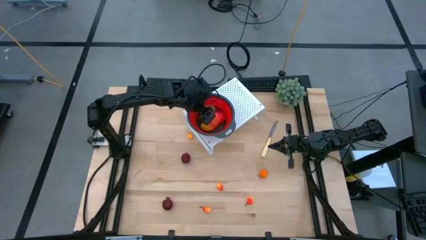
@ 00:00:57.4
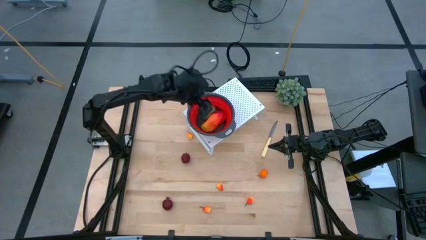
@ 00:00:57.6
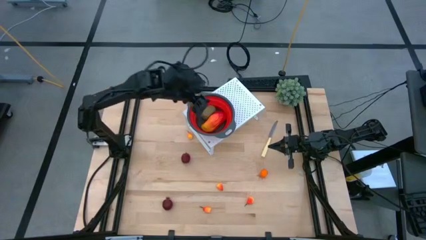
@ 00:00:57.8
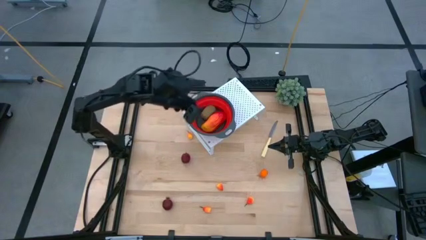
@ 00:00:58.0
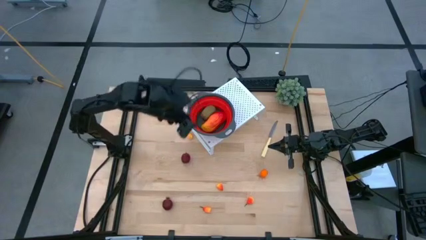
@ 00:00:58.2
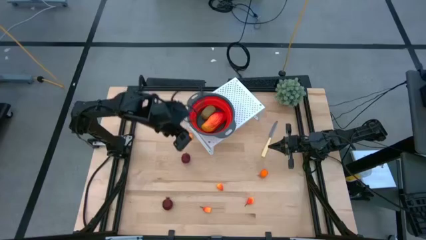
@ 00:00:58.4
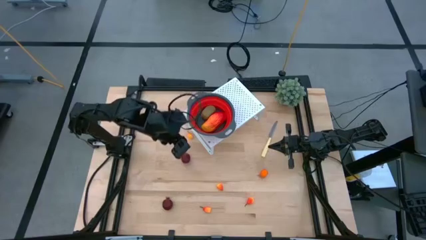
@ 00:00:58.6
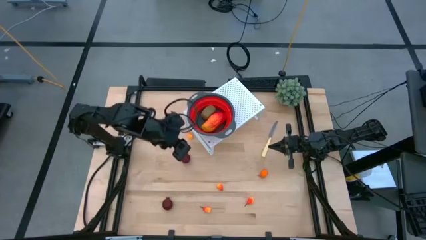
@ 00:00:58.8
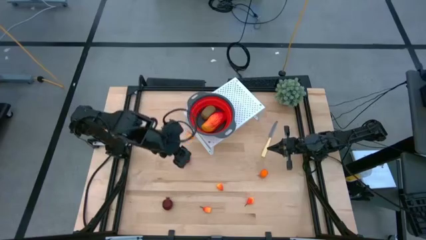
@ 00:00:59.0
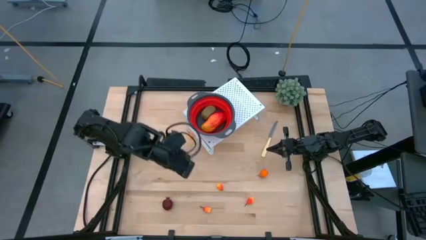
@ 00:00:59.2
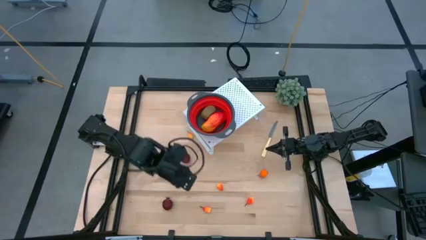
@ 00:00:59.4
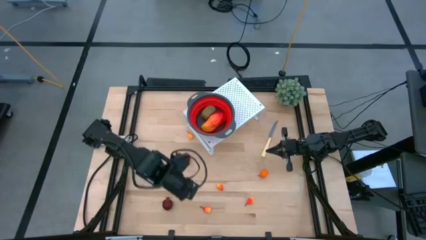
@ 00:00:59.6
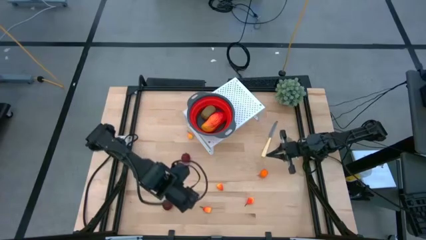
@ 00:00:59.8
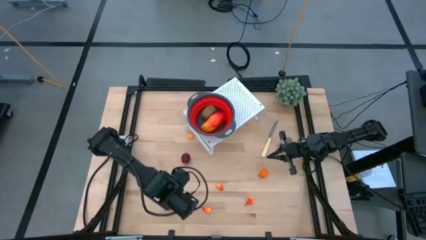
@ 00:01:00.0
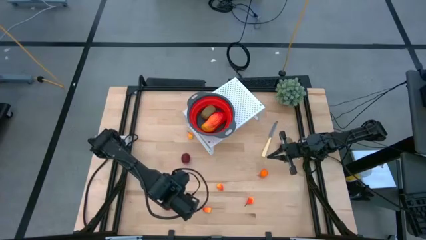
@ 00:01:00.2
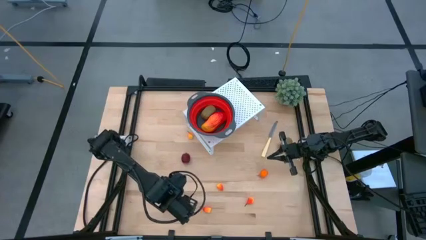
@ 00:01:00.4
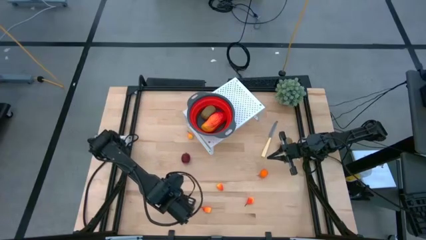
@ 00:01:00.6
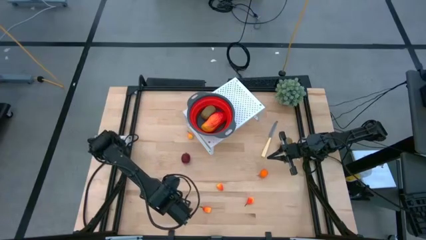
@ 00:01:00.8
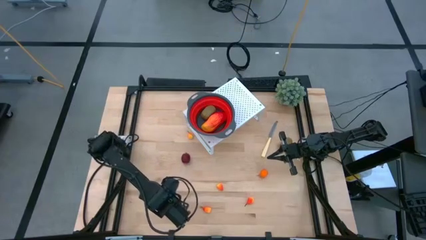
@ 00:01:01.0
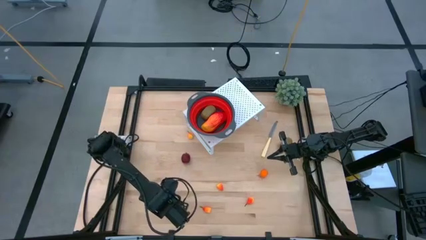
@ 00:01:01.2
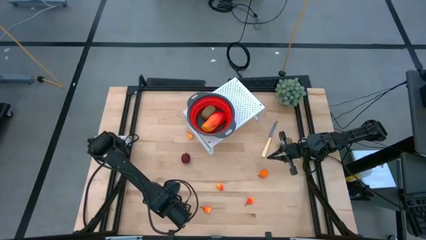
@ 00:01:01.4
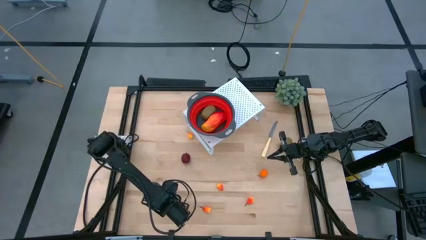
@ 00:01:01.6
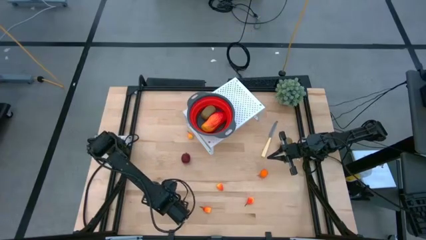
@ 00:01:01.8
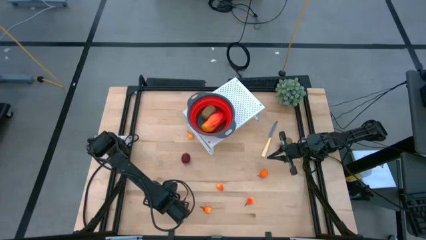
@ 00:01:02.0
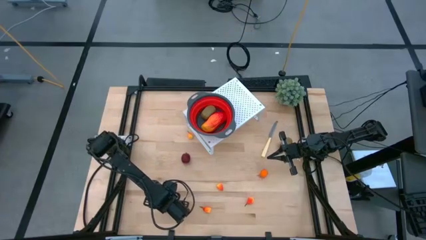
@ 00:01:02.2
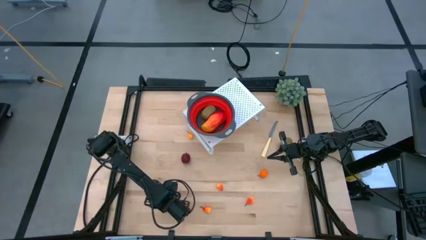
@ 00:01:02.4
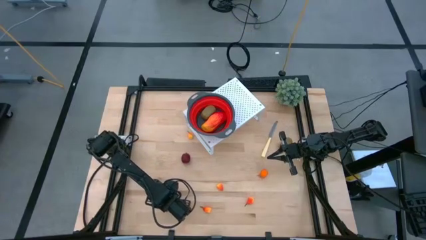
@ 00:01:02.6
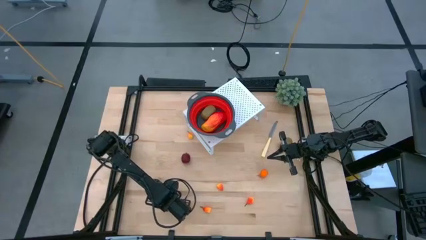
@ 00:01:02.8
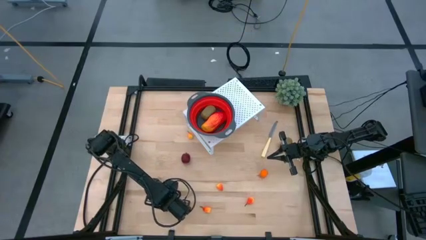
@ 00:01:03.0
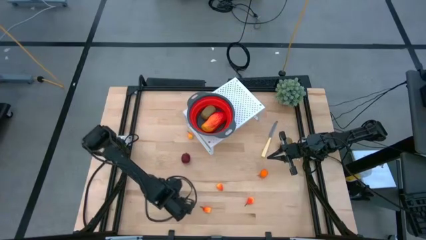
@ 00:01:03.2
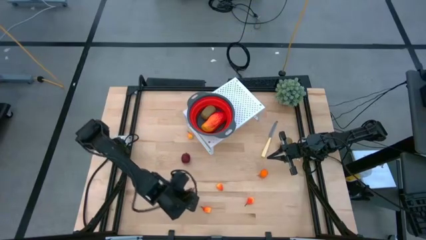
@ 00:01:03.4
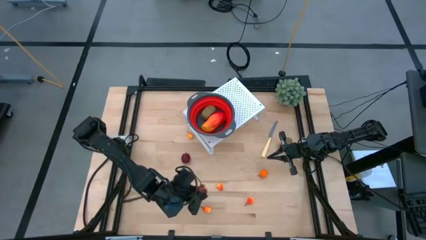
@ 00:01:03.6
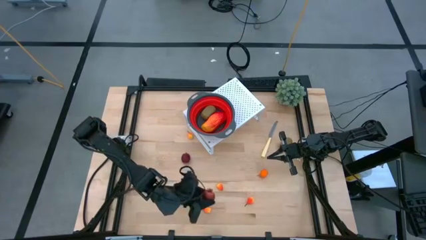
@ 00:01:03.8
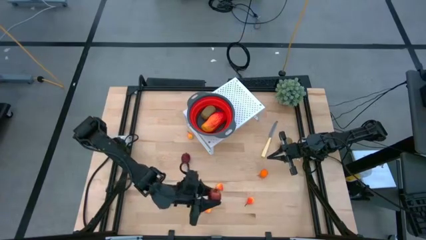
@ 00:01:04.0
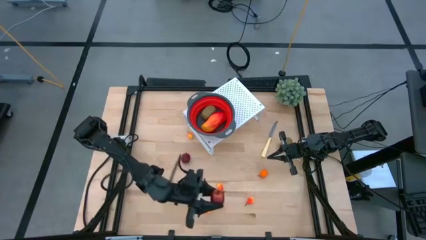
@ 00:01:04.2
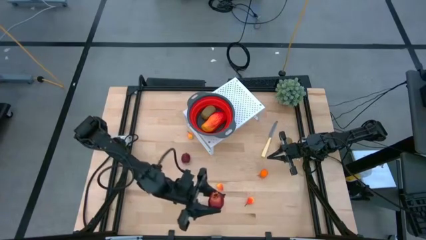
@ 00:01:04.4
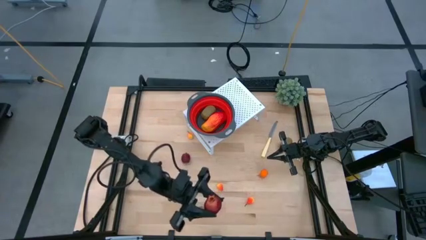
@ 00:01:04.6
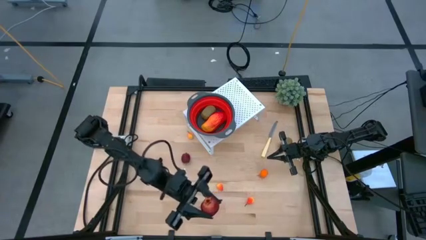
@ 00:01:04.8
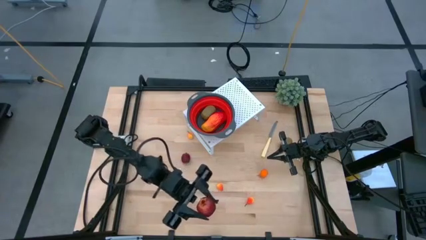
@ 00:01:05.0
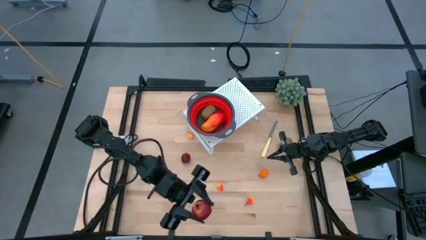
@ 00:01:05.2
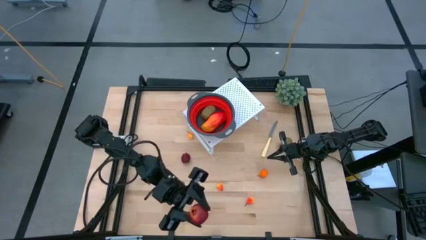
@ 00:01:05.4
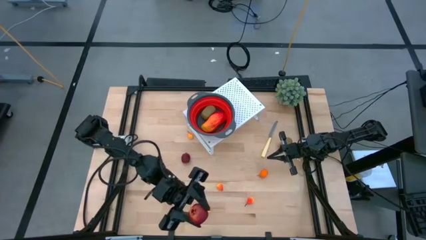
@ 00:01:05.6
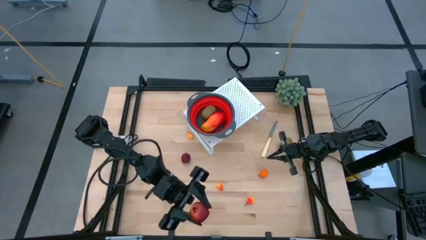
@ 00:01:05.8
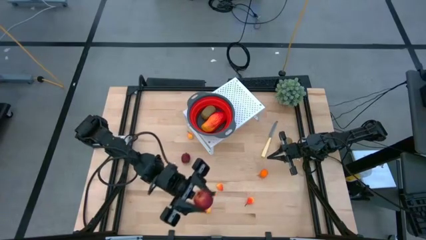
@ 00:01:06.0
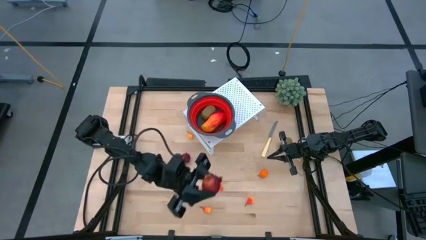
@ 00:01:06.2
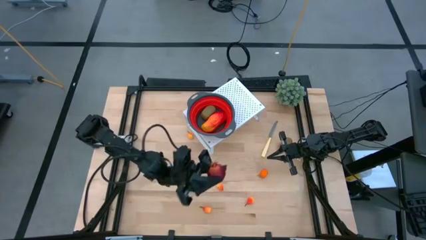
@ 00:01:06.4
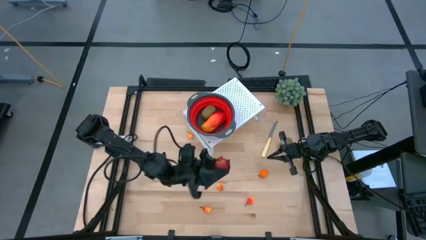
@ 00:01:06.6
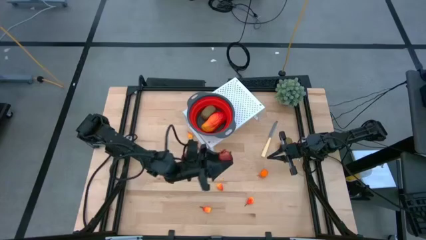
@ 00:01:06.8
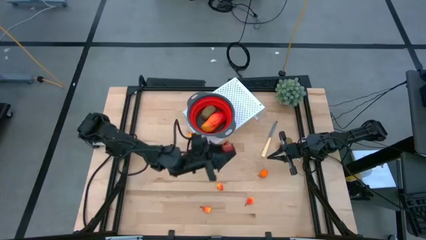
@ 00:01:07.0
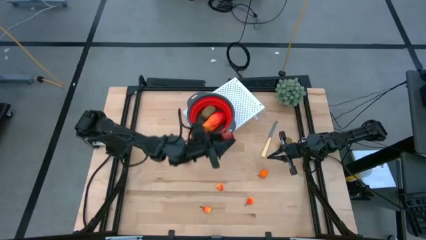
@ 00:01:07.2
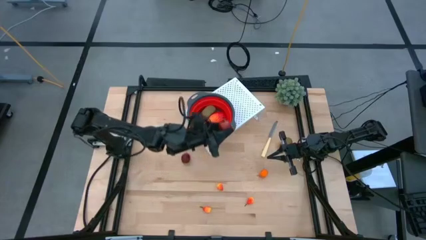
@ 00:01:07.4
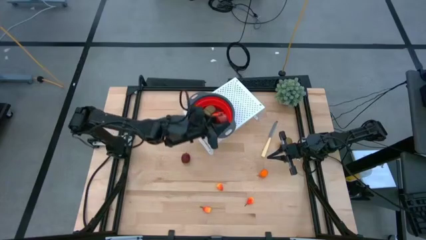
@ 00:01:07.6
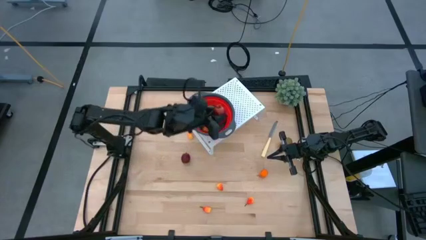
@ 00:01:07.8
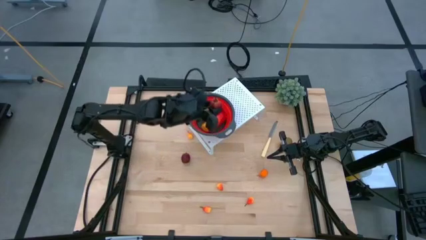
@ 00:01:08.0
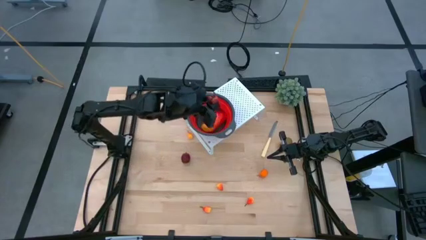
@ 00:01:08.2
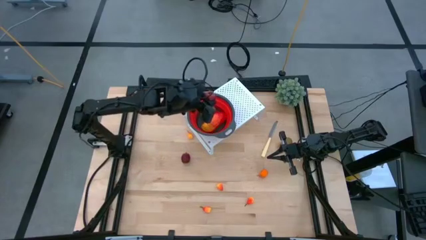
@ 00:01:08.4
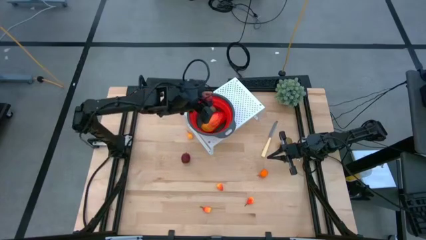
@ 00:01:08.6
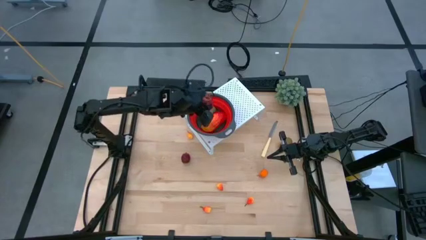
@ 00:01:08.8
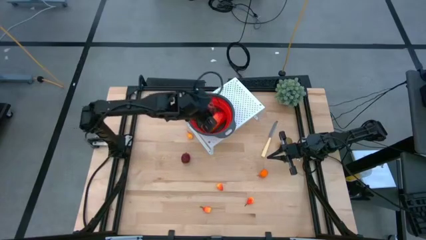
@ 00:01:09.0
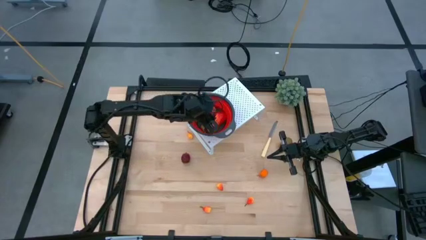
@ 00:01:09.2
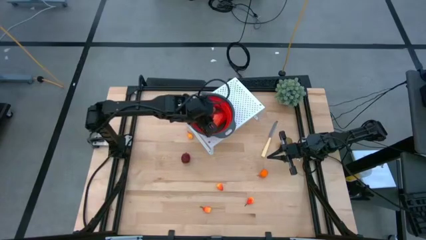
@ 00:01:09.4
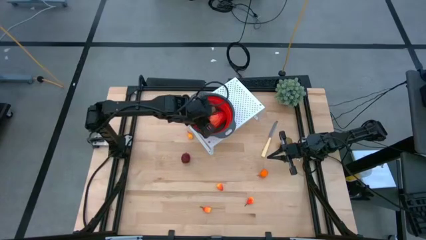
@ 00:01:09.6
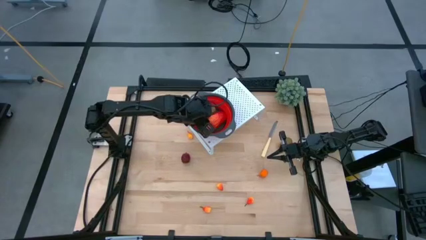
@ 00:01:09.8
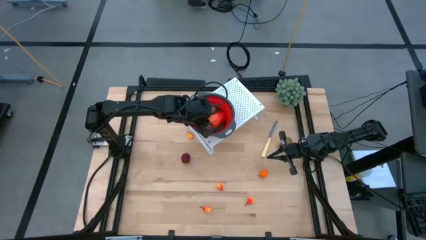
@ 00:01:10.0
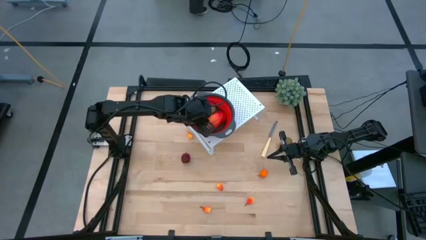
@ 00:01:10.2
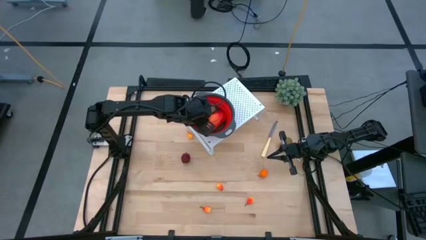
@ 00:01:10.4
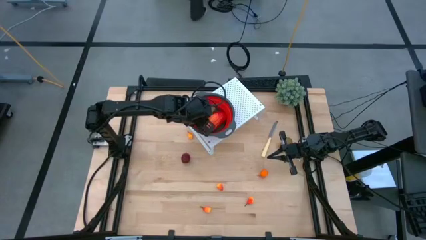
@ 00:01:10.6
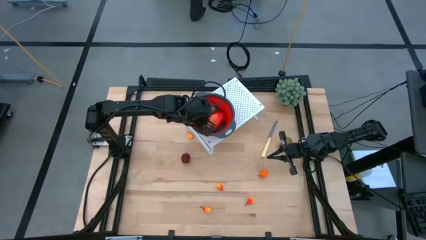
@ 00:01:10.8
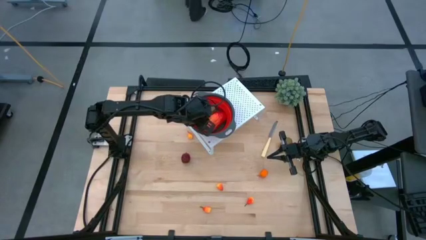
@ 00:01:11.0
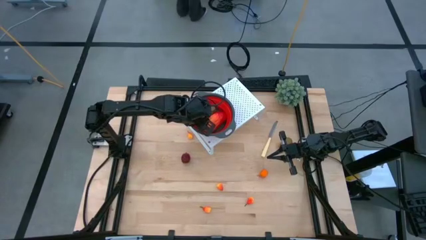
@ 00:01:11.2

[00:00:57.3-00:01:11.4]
Task: Pick & Place Fruit
Put the pomegranate into the red strainer bowl on the shelf

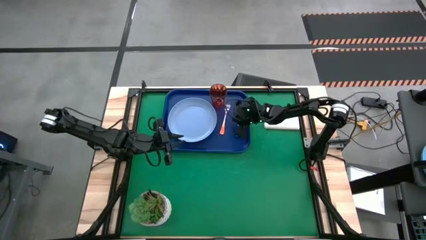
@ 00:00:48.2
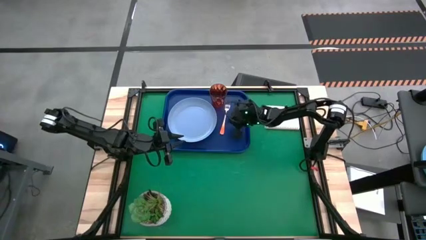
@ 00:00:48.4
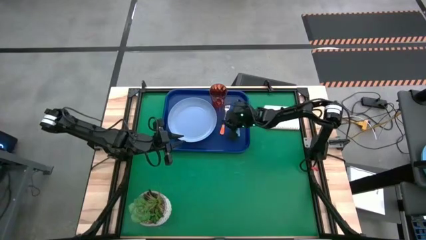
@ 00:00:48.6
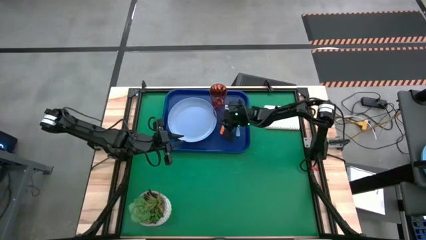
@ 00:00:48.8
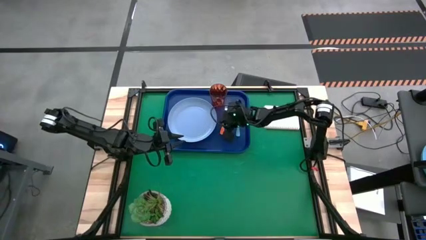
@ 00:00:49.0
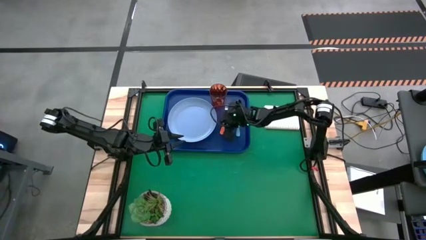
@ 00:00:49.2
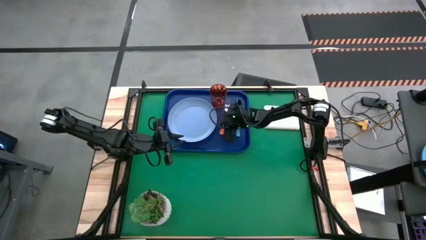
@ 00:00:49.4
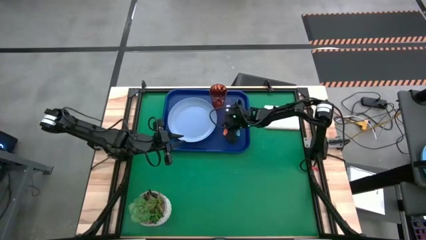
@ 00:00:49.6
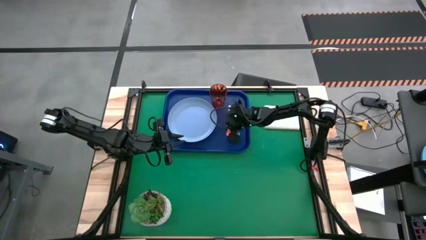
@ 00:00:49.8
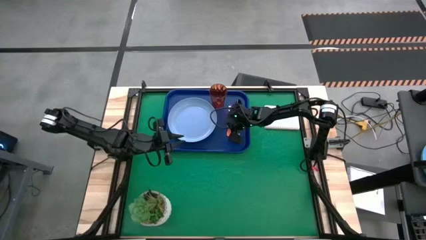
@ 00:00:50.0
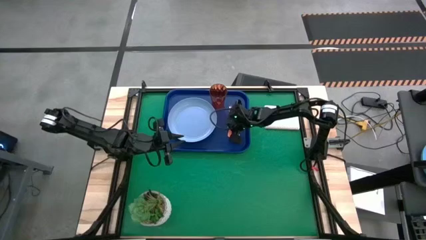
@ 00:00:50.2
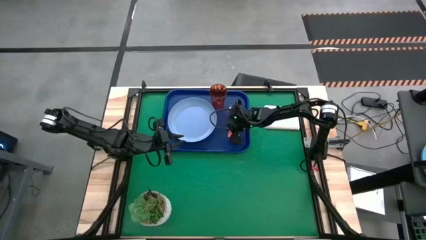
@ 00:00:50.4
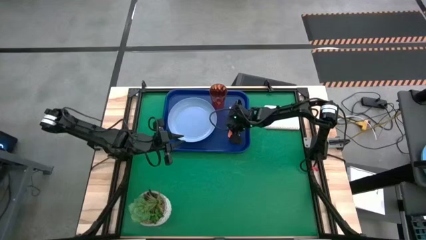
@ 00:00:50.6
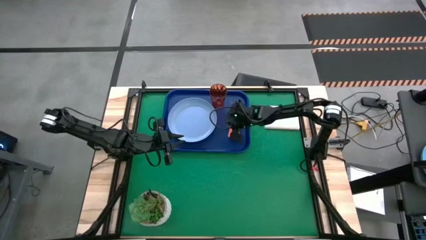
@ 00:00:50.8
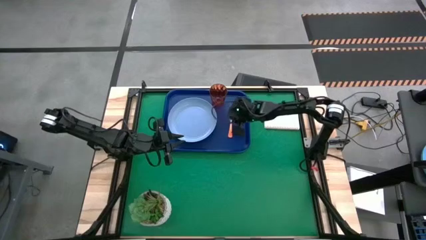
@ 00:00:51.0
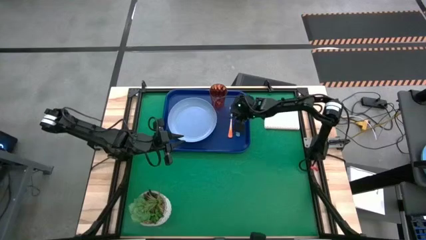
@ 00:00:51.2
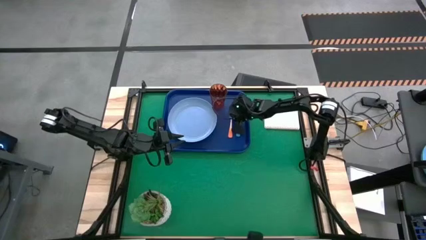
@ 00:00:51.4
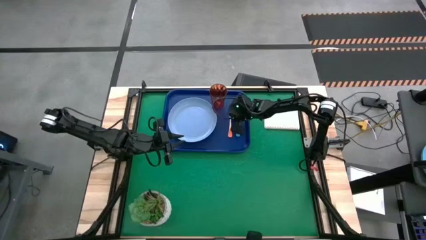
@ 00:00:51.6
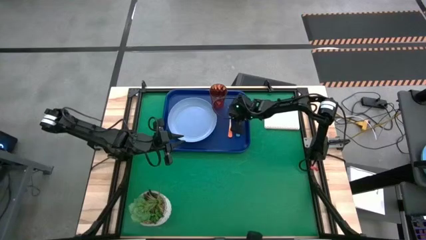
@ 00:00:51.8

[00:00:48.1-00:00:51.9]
Task: Pick and place plate/cup/fork/spoon on tray
Adjust the orange fork on the blue tray
